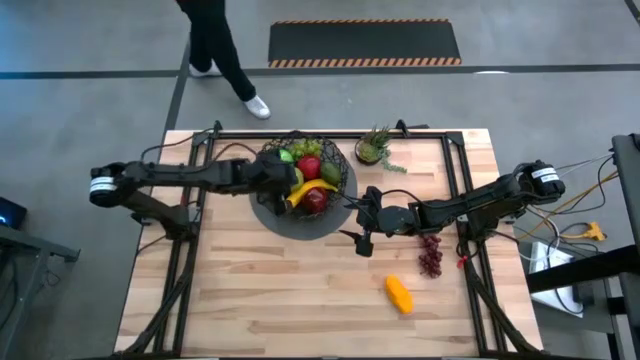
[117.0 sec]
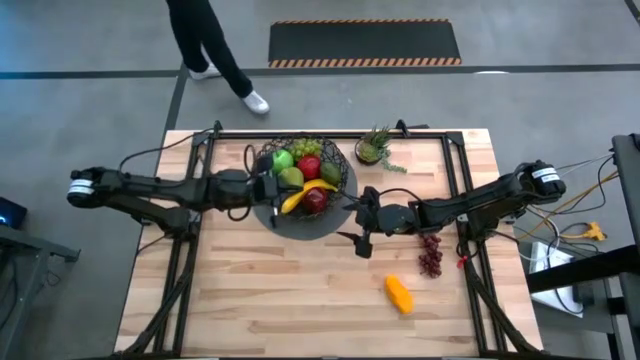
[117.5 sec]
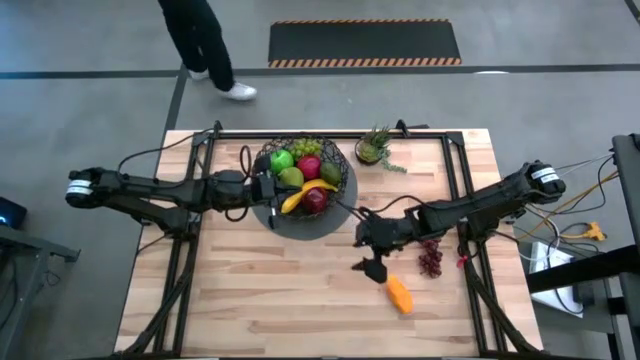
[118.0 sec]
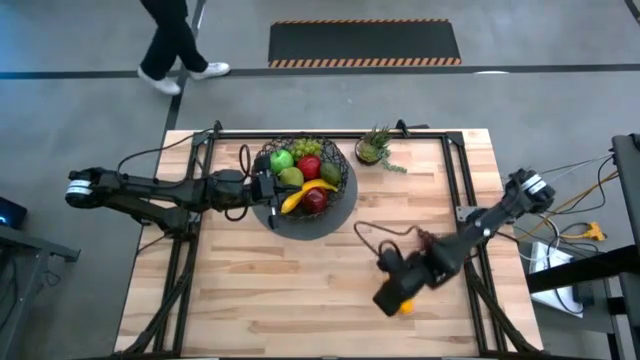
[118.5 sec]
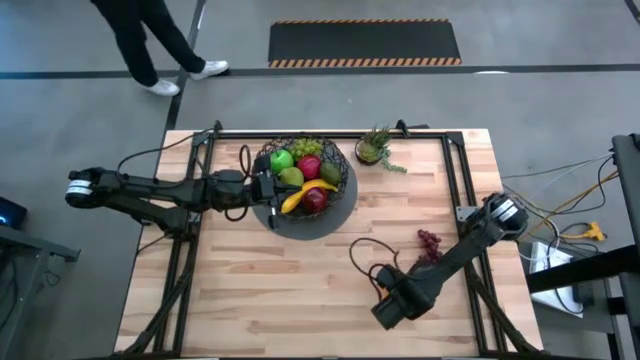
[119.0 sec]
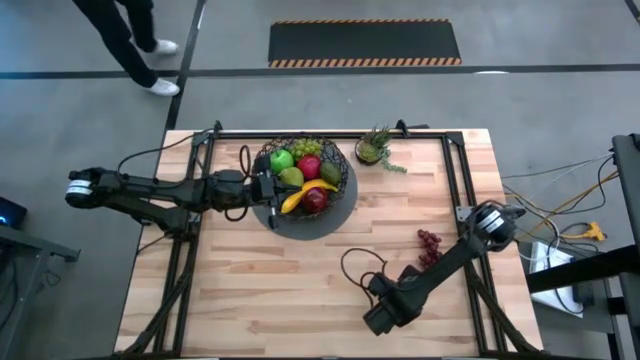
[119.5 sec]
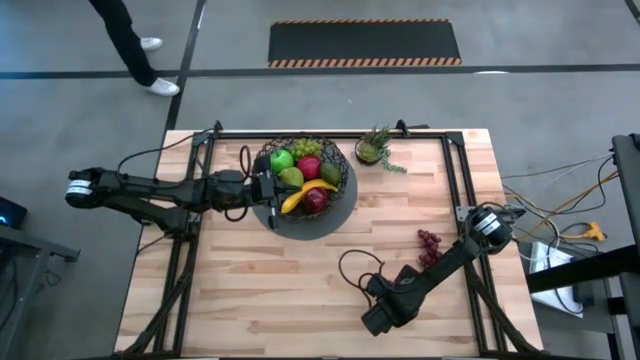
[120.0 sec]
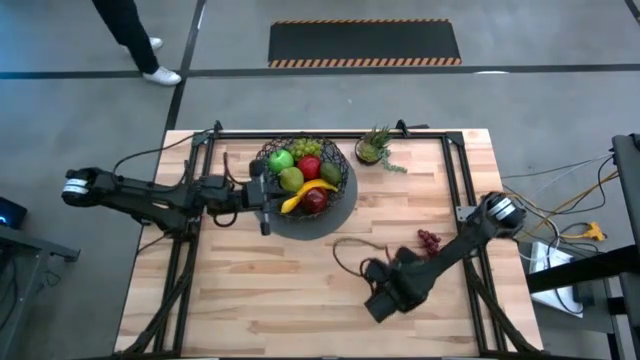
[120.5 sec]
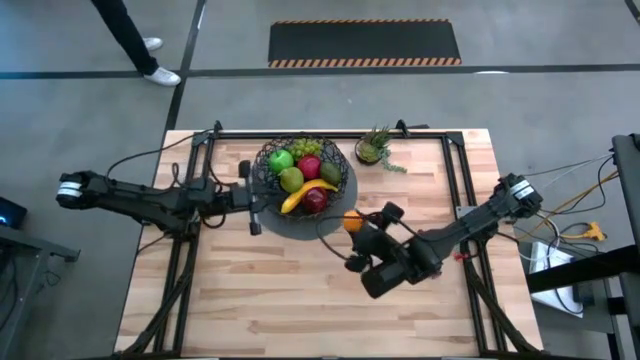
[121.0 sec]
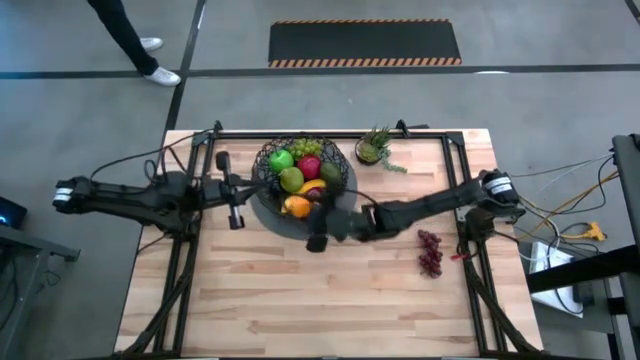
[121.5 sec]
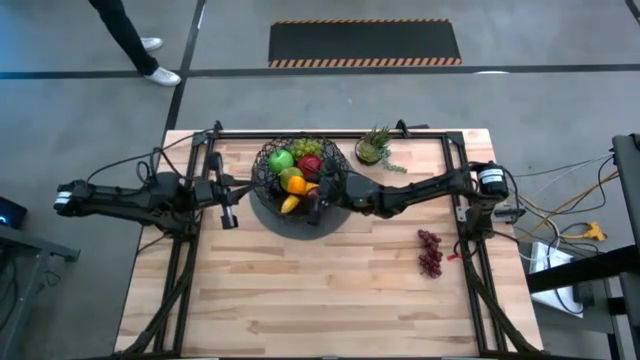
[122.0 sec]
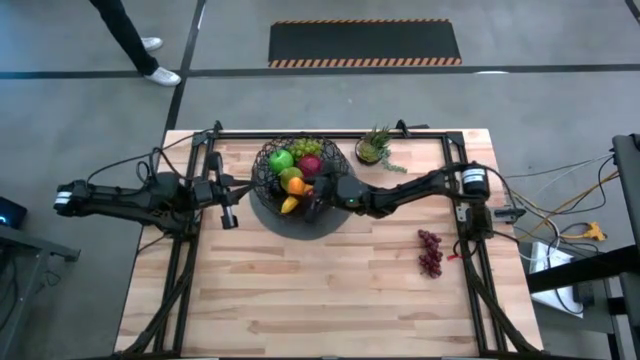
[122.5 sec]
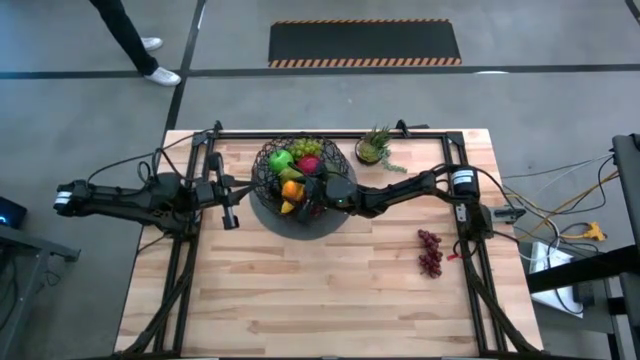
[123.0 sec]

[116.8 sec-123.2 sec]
Task: Build produce basket
Put the mango into the black wire basket

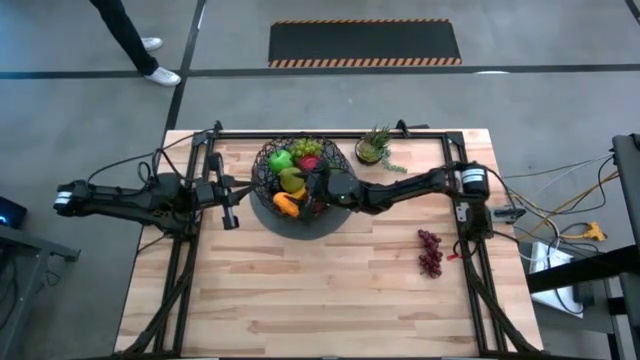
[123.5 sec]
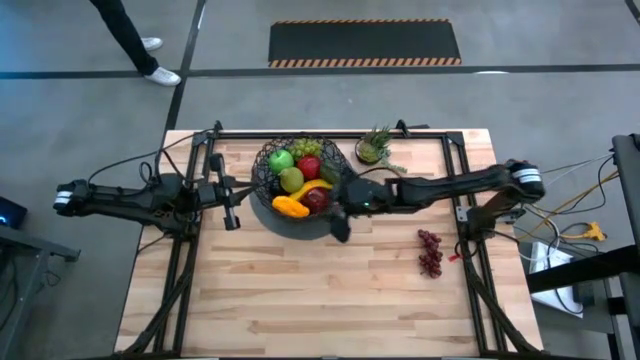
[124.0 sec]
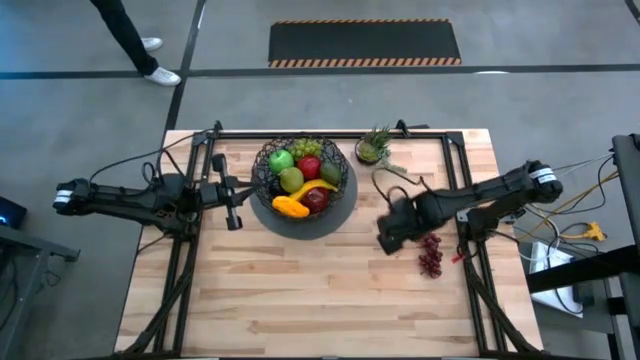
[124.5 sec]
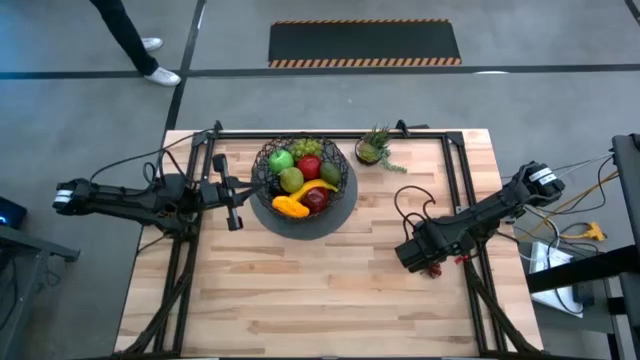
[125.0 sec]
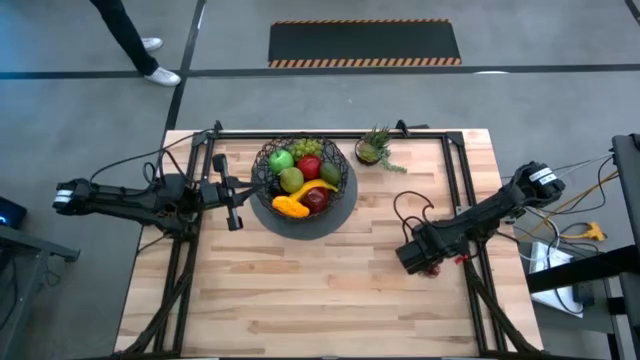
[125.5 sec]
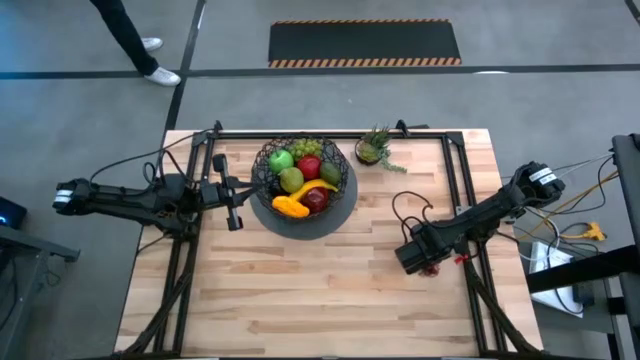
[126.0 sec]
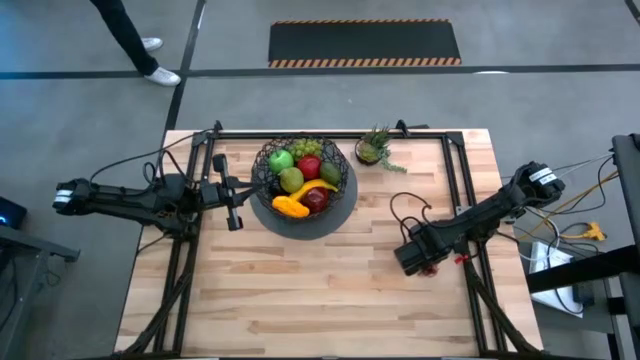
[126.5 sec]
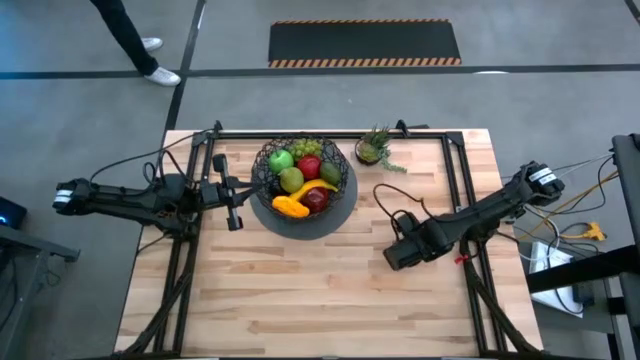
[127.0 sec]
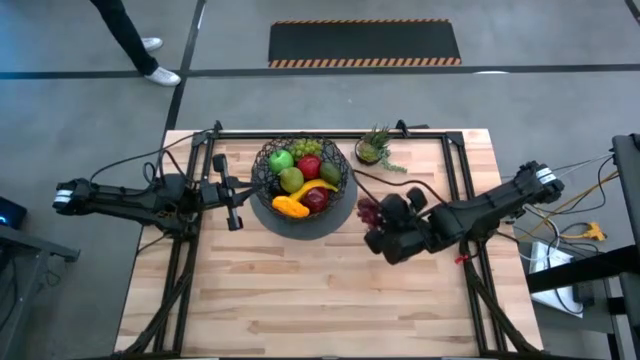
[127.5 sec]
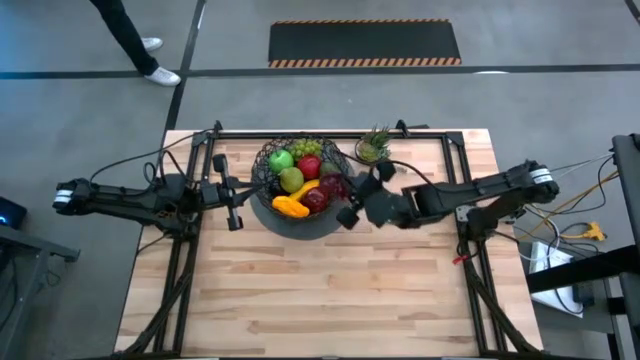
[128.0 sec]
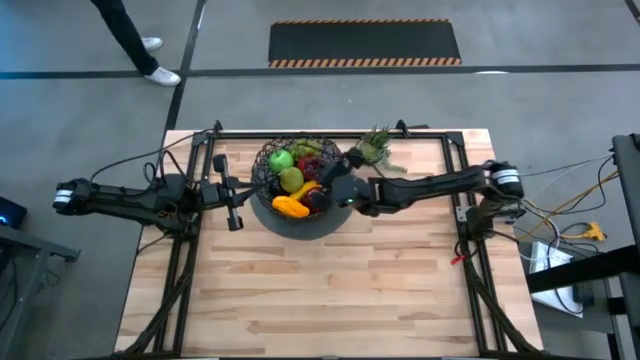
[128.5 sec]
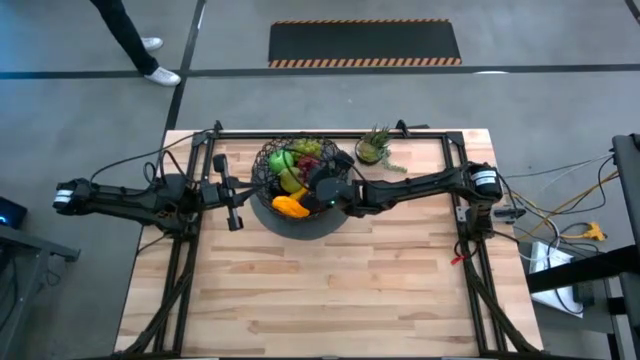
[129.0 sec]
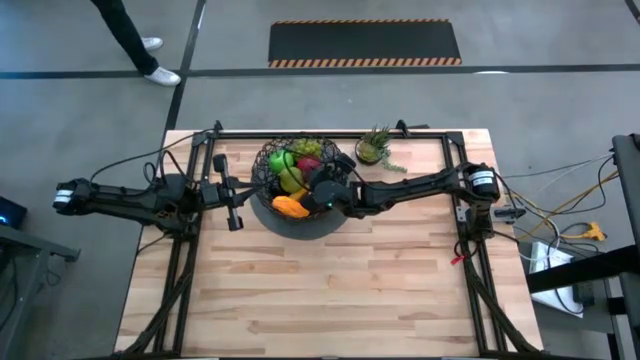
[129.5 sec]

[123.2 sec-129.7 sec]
Put the red grapes into the black wire basket

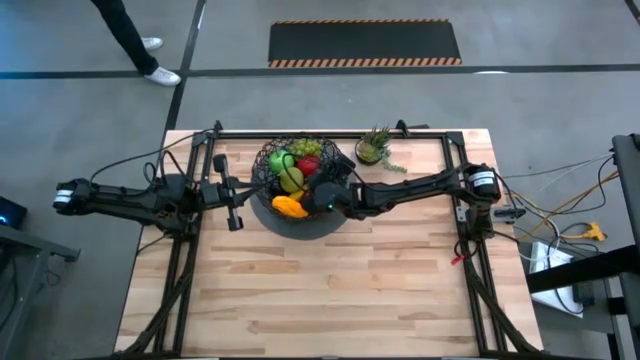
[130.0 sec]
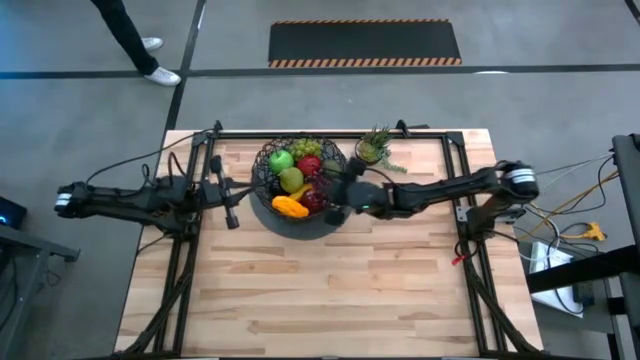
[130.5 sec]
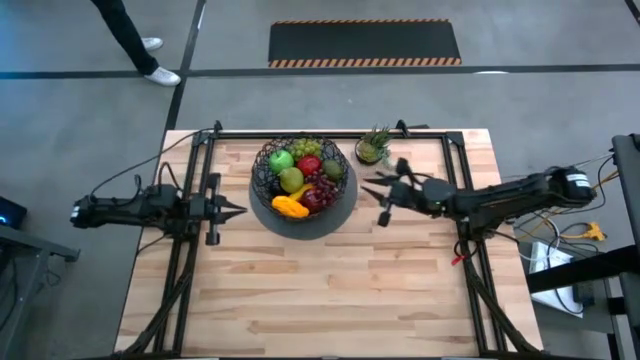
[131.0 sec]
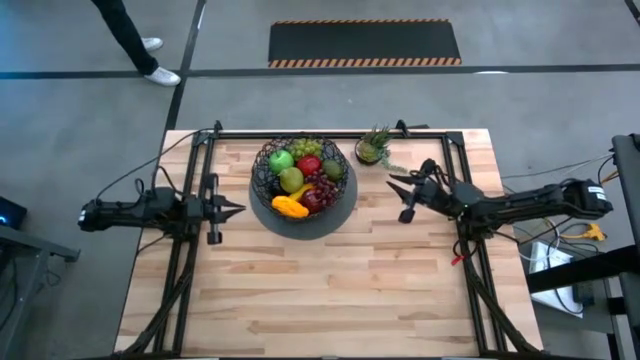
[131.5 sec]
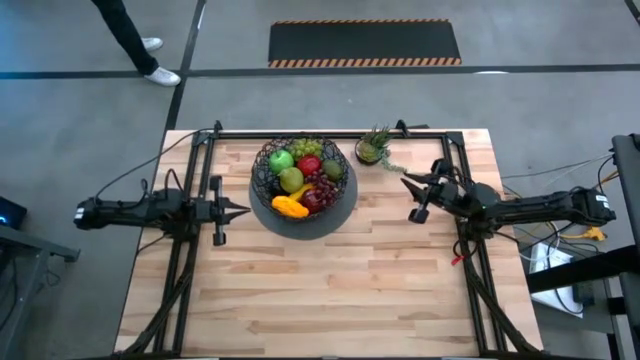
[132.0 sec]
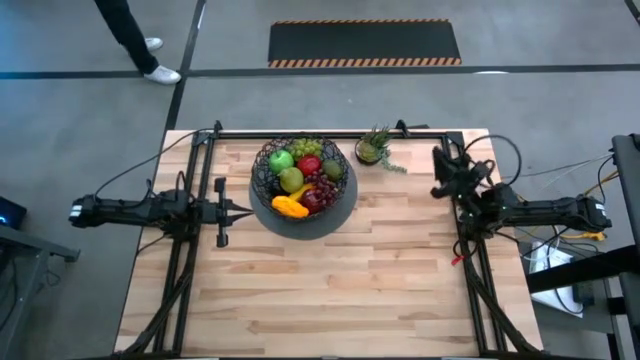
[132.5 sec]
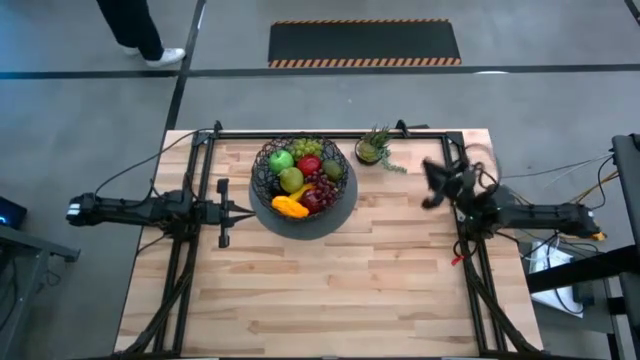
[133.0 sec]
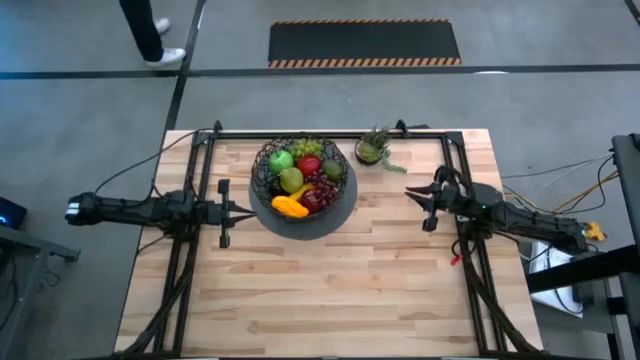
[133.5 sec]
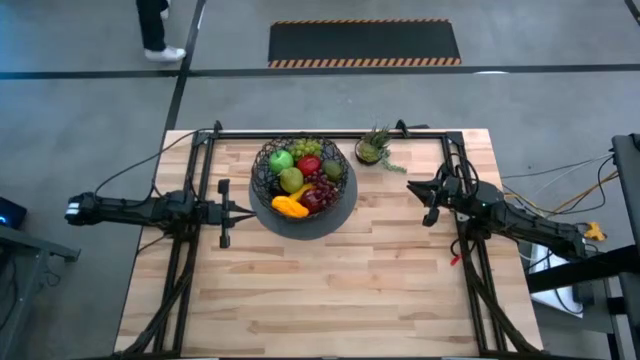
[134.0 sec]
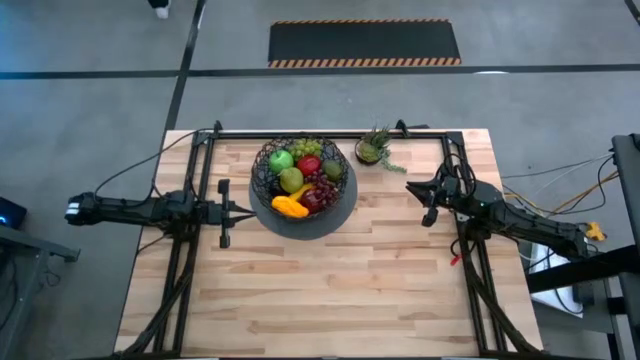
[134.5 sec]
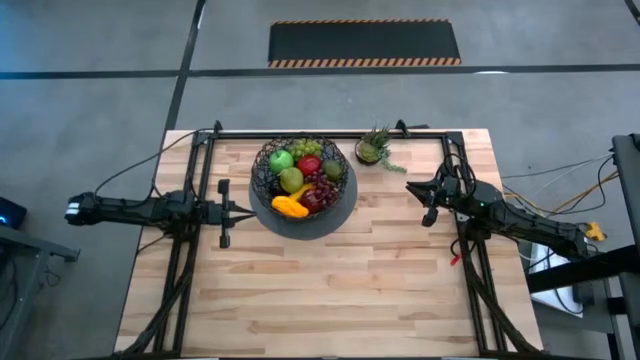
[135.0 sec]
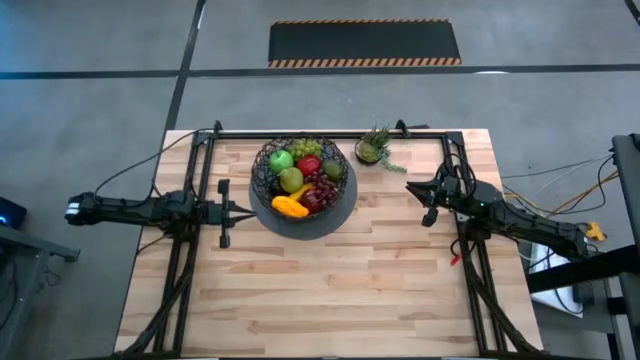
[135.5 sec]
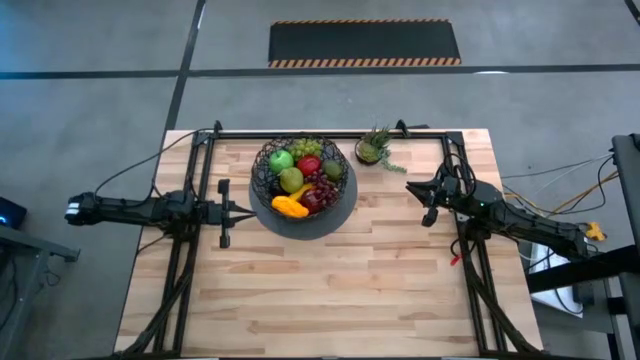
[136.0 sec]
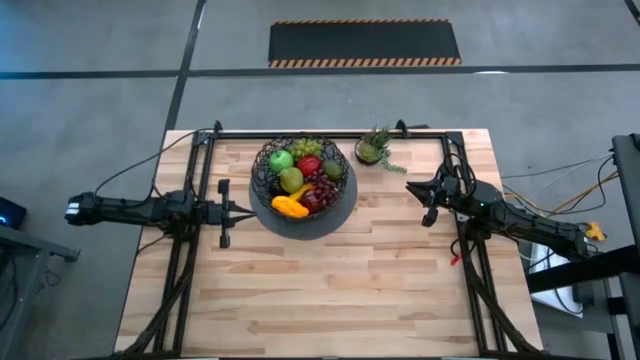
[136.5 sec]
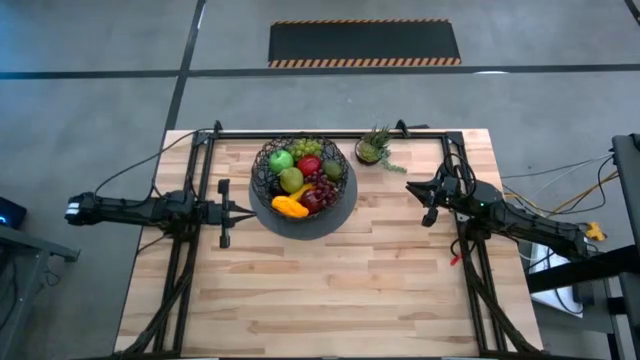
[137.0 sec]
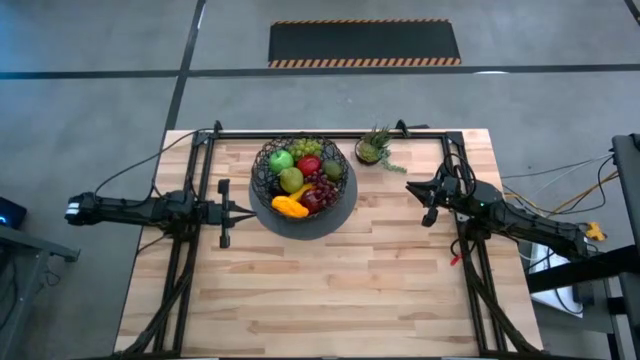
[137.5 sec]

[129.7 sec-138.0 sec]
Return to Home Position
